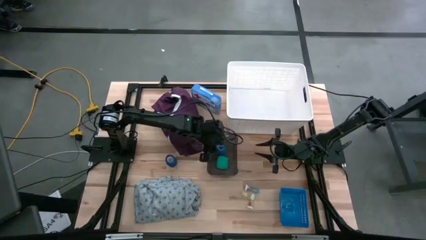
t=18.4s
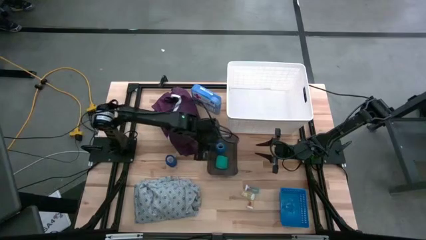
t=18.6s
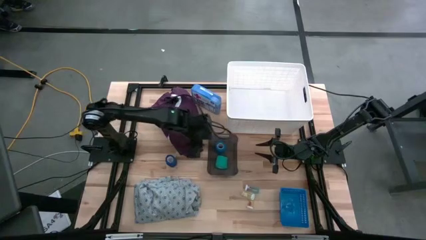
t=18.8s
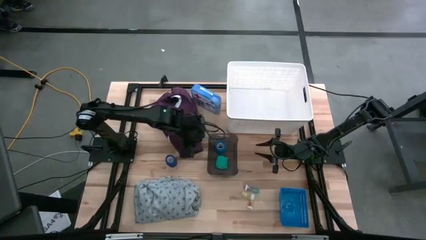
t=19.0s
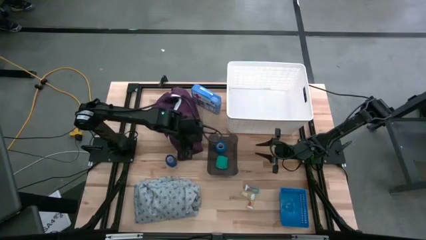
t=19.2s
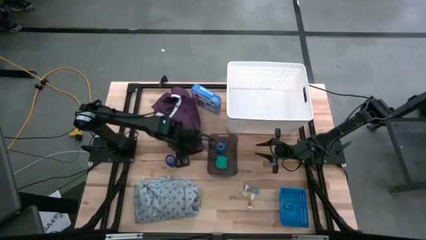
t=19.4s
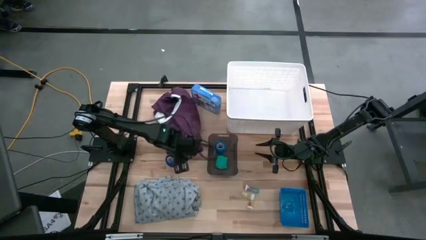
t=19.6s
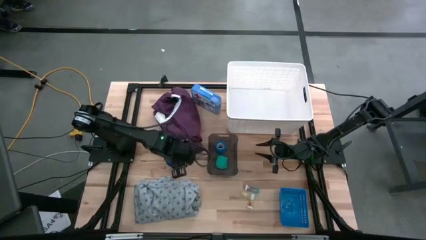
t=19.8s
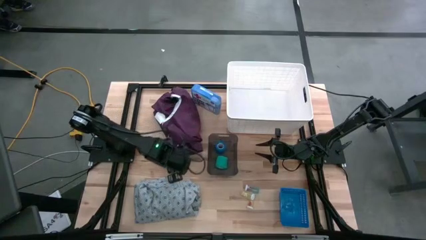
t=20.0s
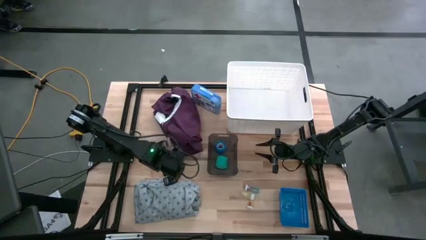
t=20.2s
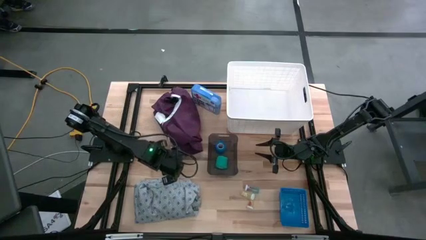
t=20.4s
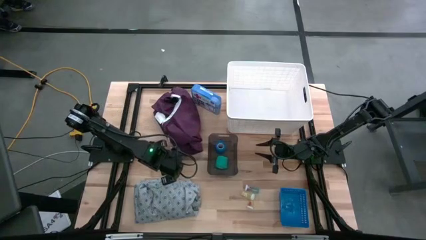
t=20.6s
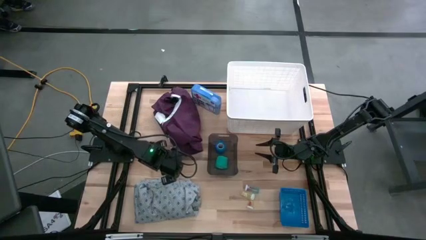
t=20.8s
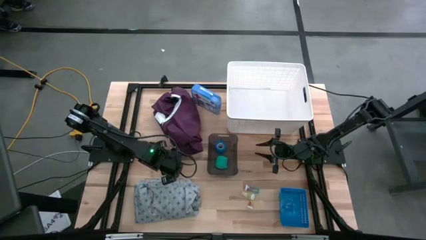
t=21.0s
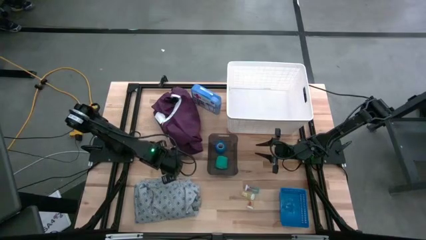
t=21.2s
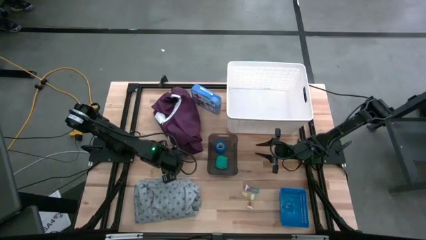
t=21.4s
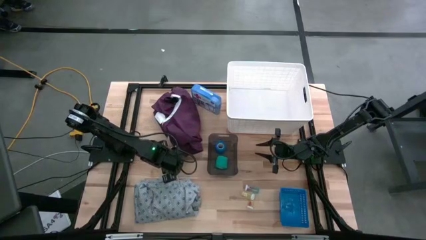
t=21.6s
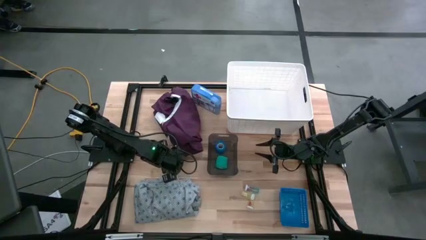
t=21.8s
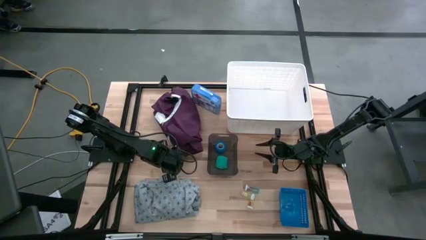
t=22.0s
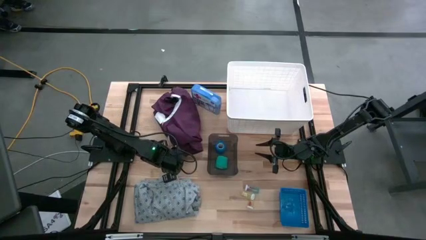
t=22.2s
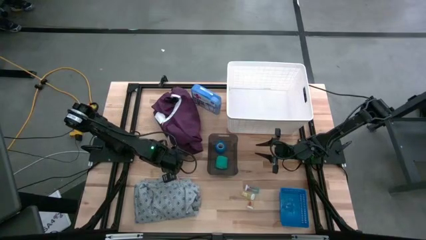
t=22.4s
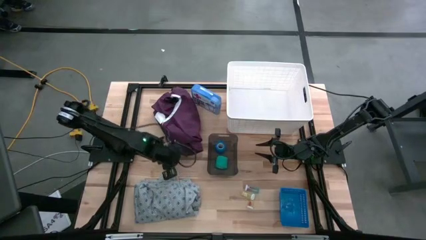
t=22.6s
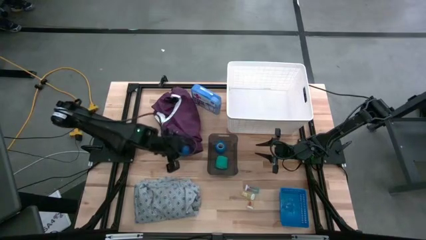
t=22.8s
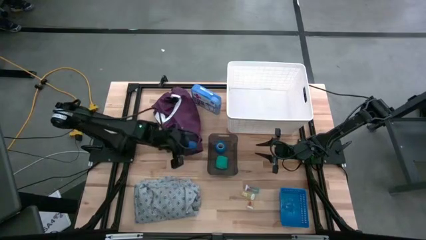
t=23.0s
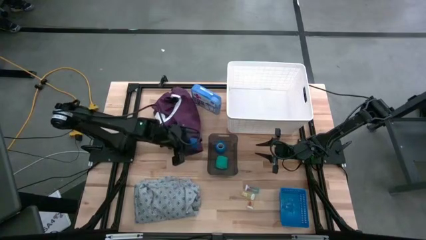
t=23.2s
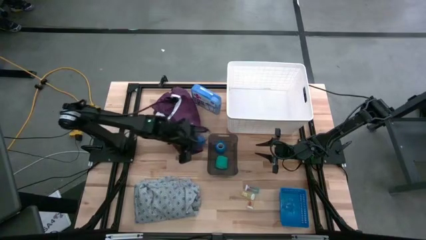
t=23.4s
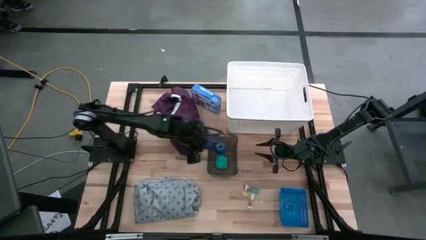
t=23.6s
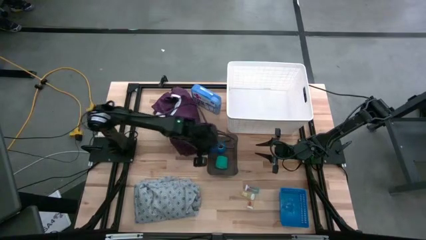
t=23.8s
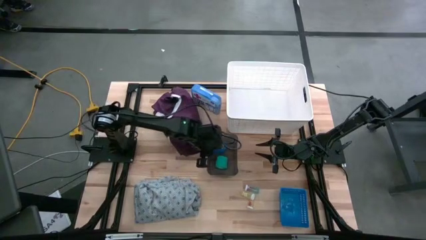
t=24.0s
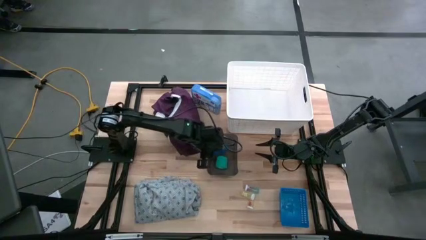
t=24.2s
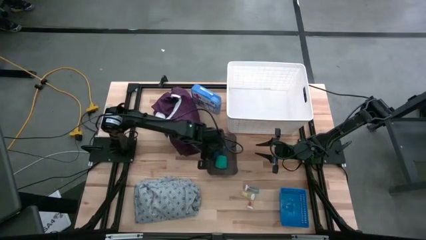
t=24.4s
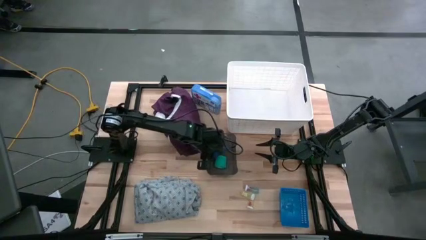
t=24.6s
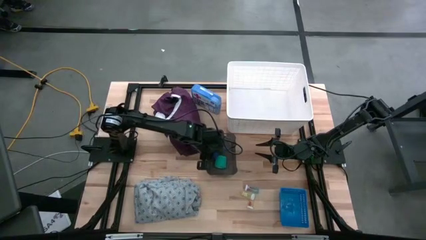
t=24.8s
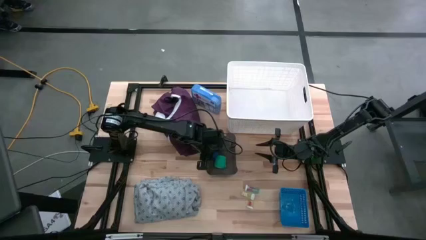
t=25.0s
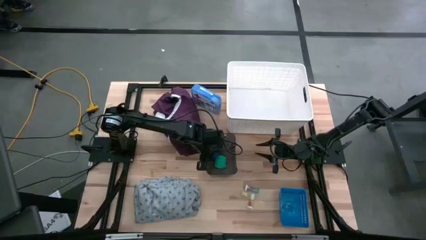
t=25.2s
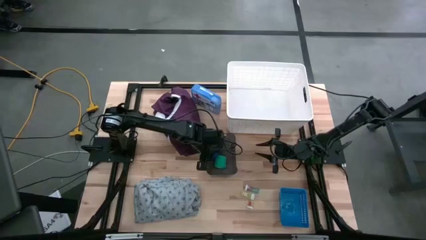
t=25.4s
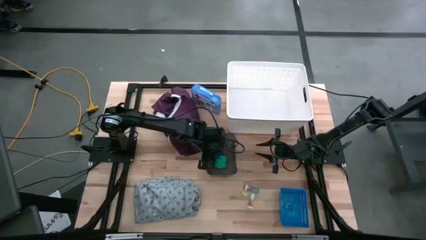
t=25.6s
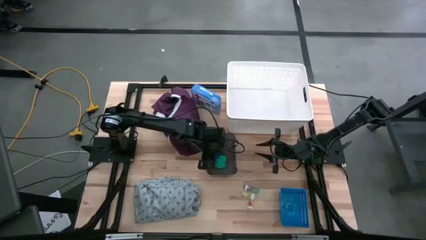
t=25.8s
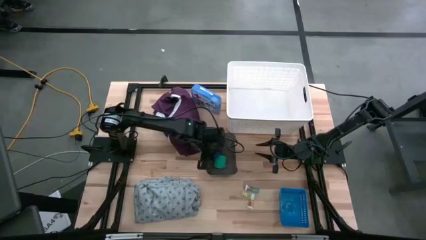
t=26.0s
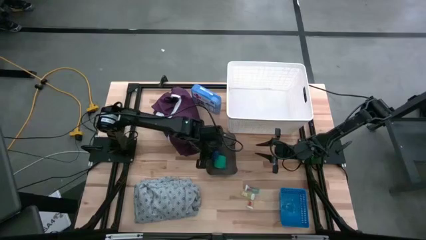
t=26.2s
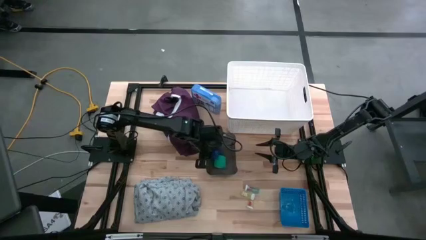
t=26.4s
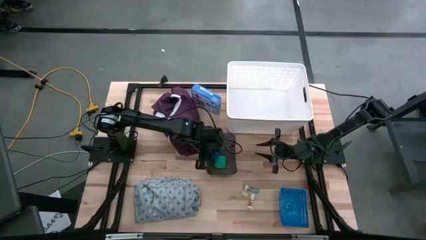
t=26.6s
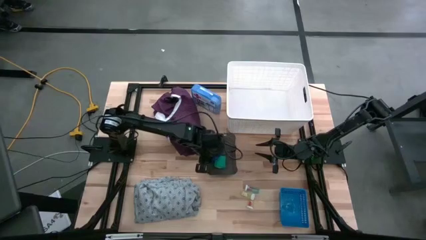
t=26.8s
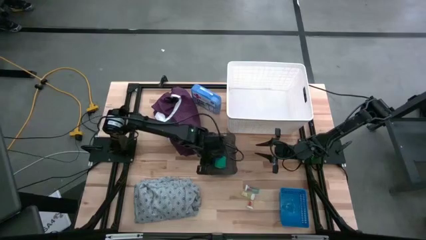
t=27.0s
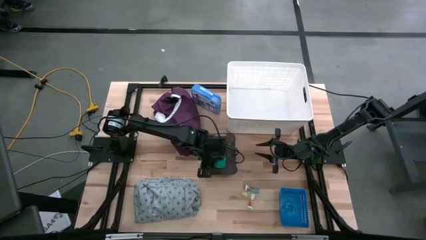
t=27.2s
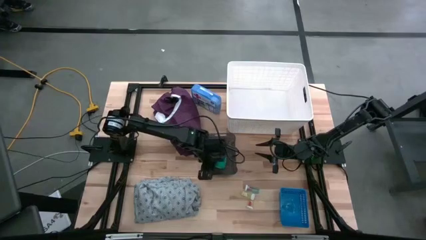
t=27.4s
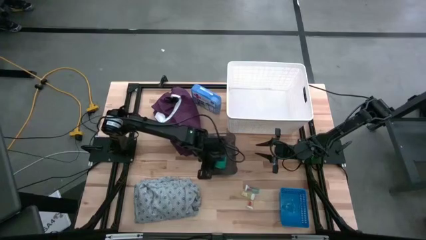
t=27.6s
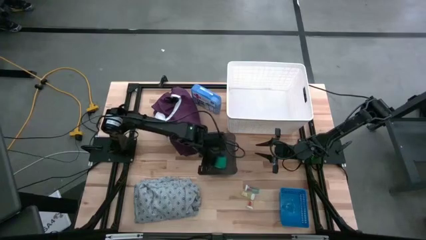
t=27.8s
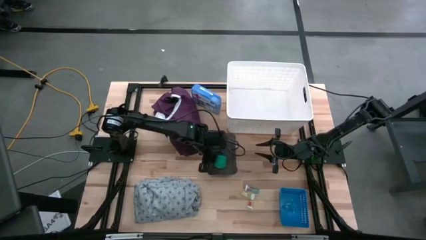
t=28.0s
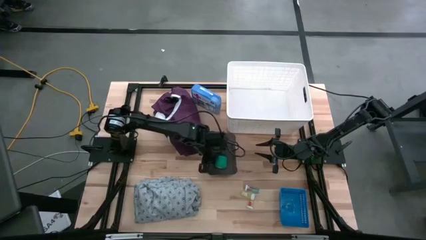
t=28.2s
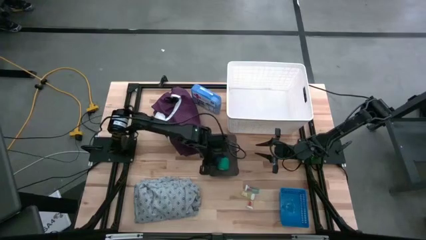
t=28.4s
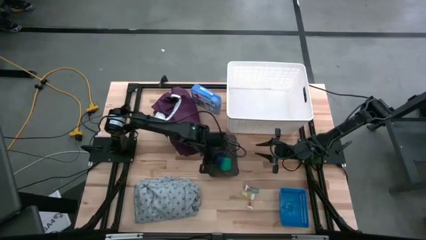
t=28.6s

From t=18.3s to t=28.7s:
Task: Pick & Place Medicine items
Put the blue rolled bandage into the black bin
